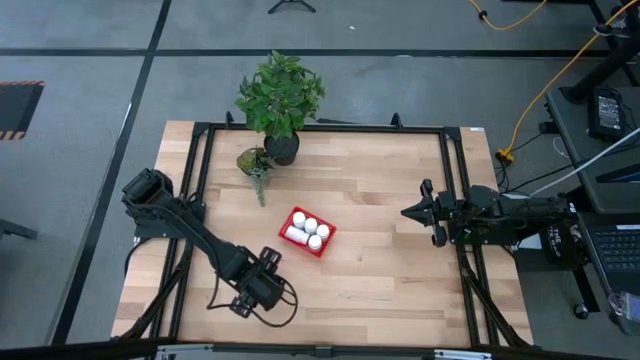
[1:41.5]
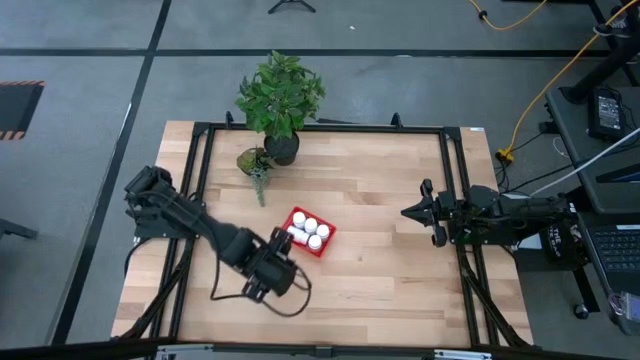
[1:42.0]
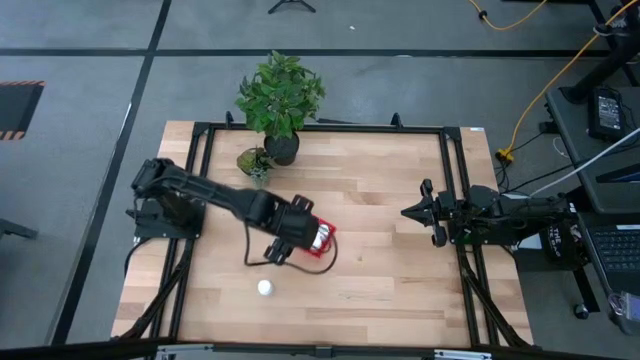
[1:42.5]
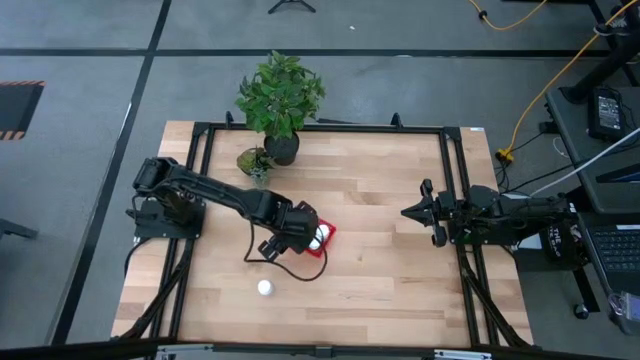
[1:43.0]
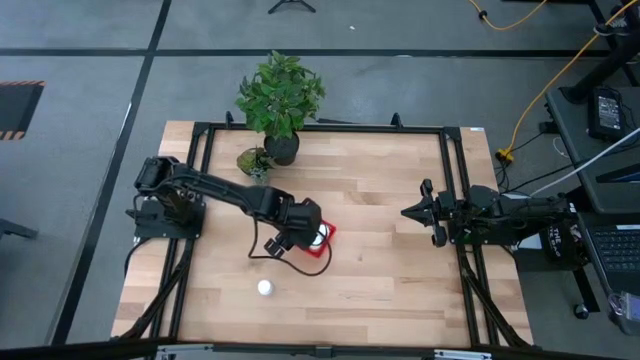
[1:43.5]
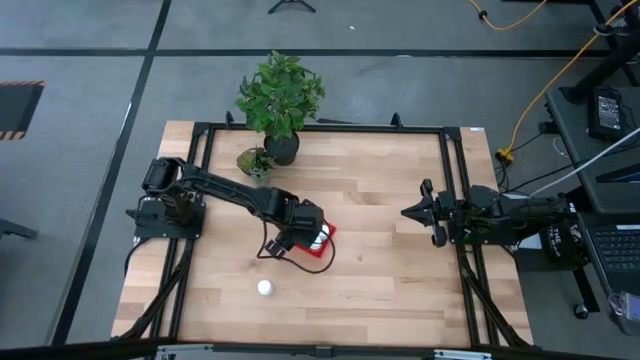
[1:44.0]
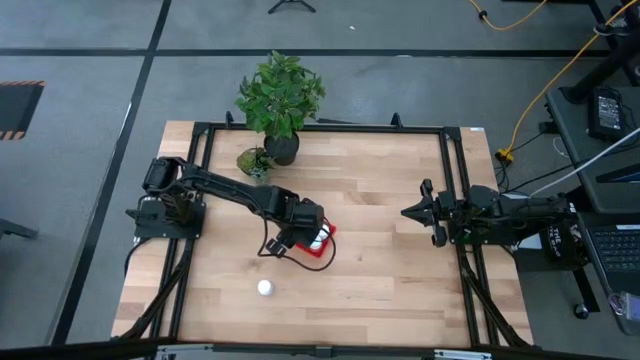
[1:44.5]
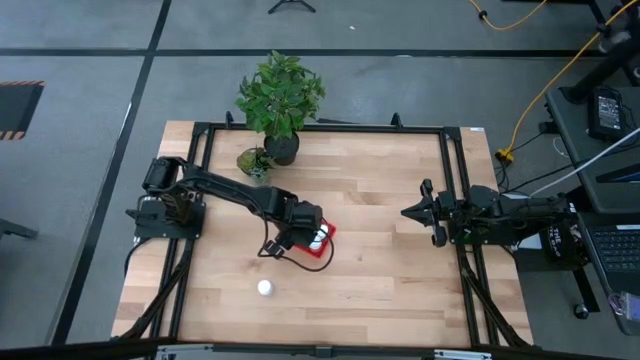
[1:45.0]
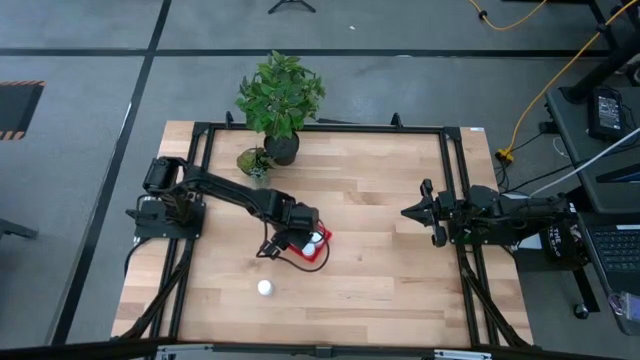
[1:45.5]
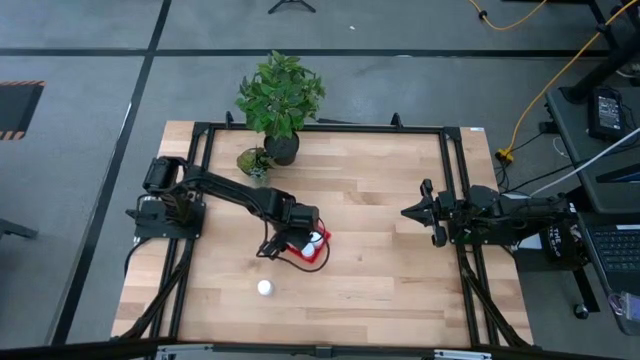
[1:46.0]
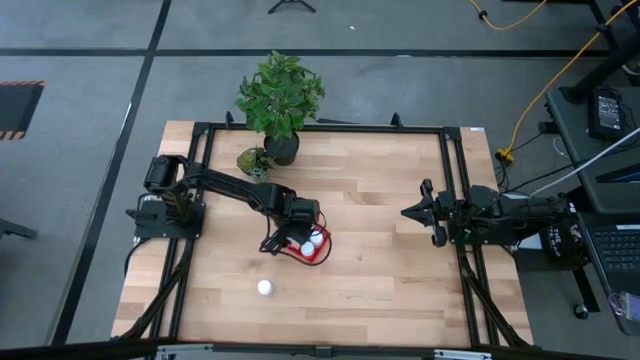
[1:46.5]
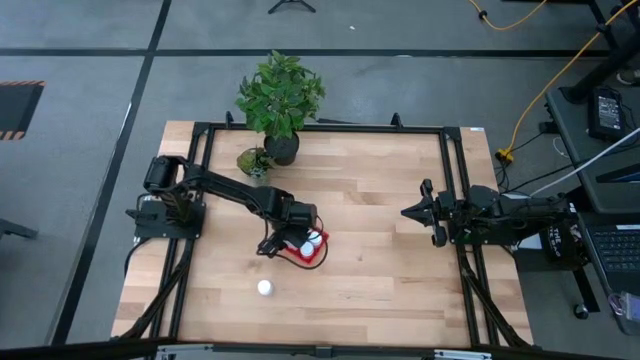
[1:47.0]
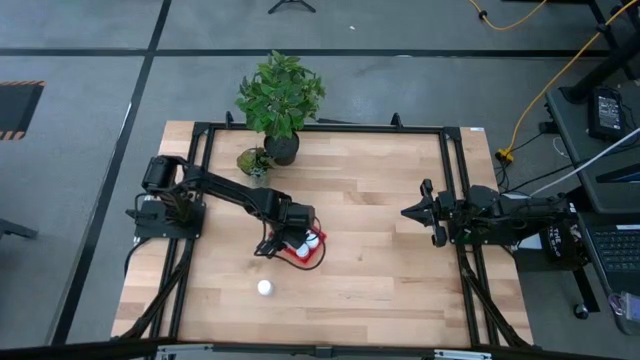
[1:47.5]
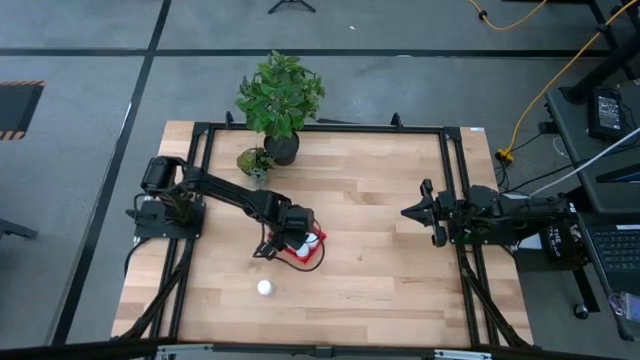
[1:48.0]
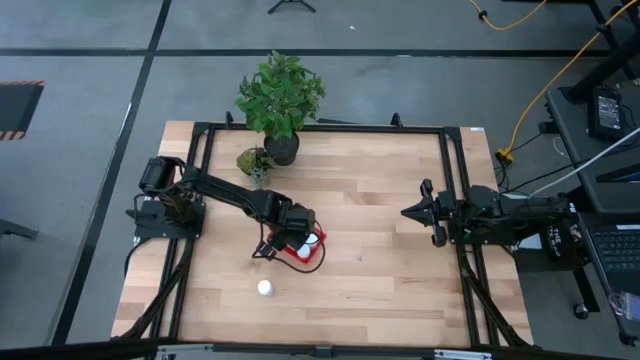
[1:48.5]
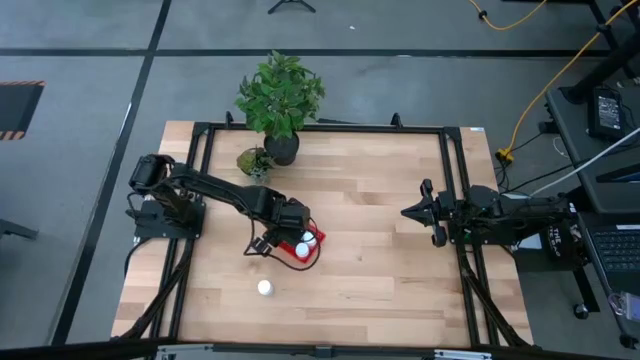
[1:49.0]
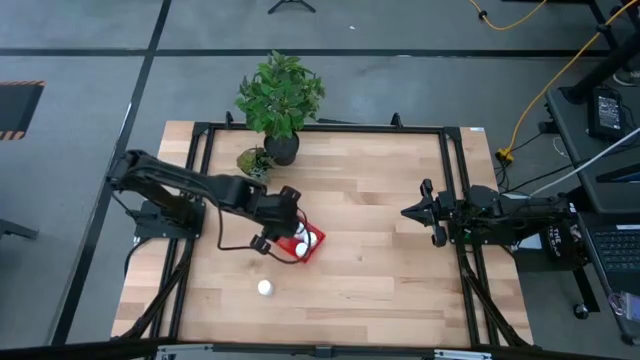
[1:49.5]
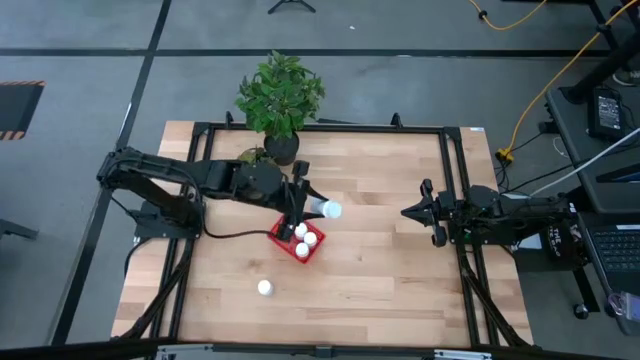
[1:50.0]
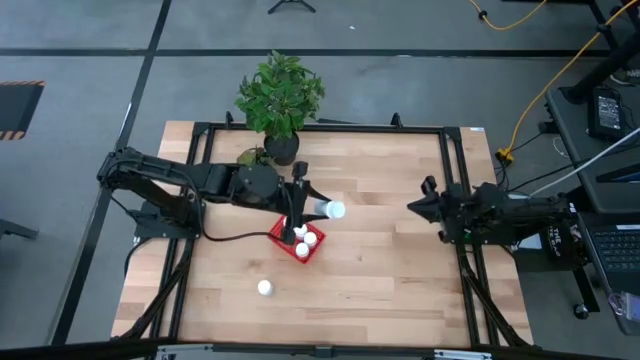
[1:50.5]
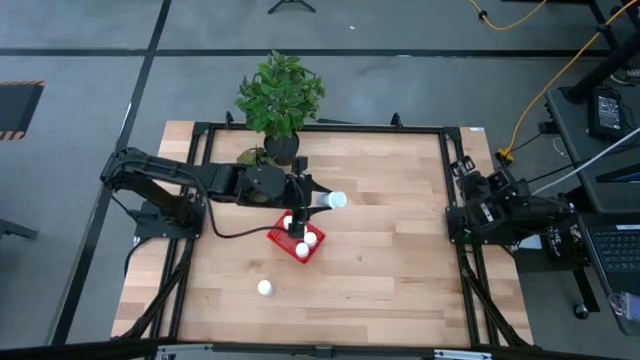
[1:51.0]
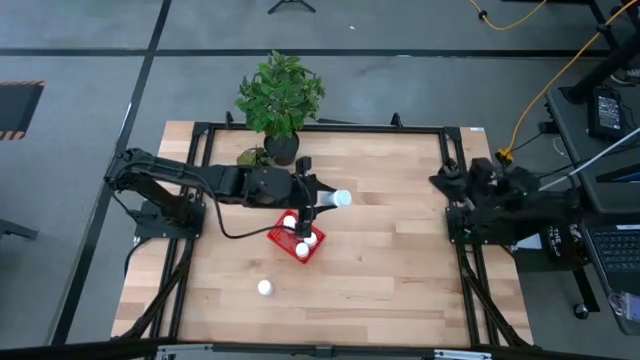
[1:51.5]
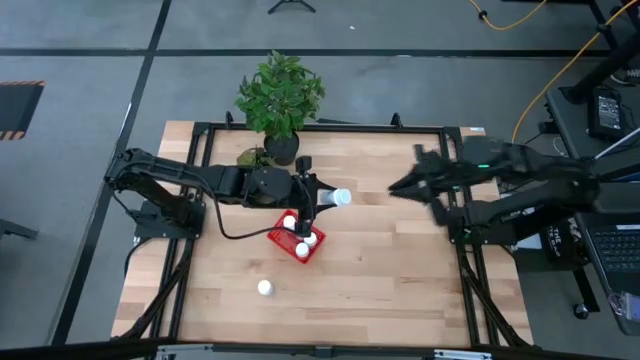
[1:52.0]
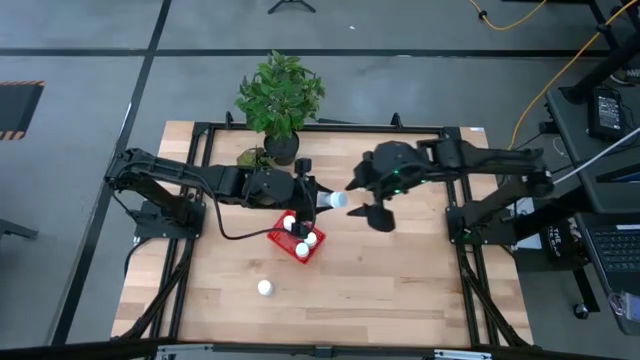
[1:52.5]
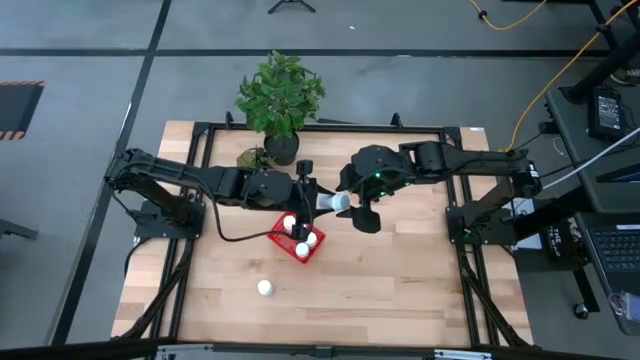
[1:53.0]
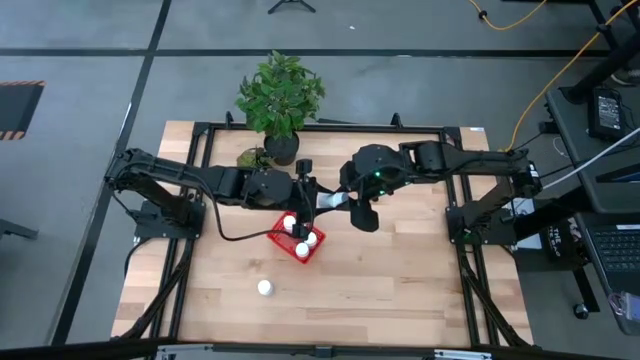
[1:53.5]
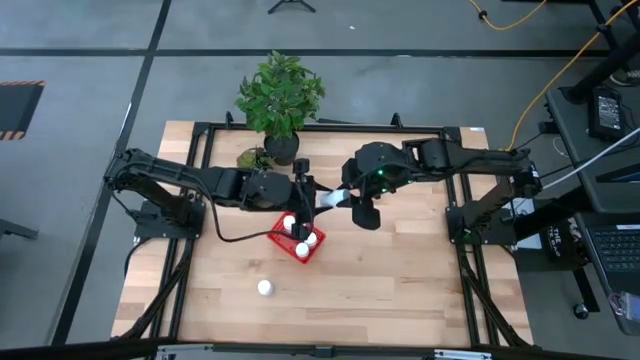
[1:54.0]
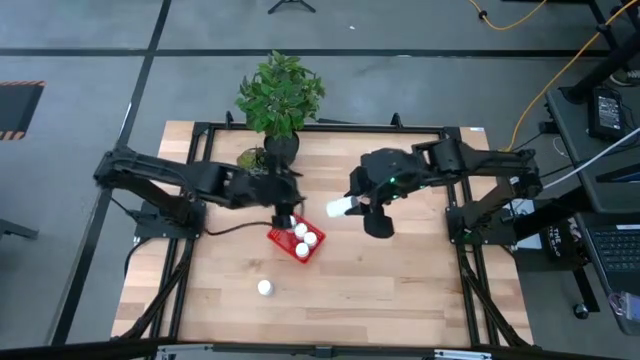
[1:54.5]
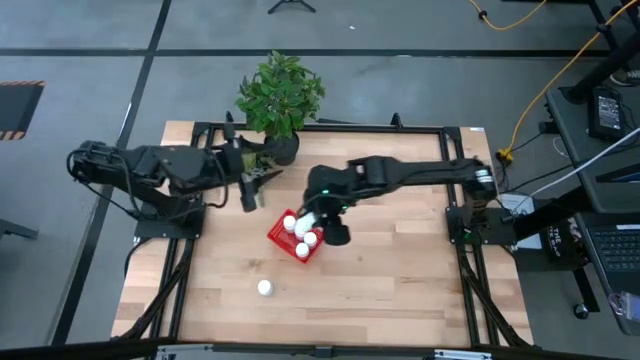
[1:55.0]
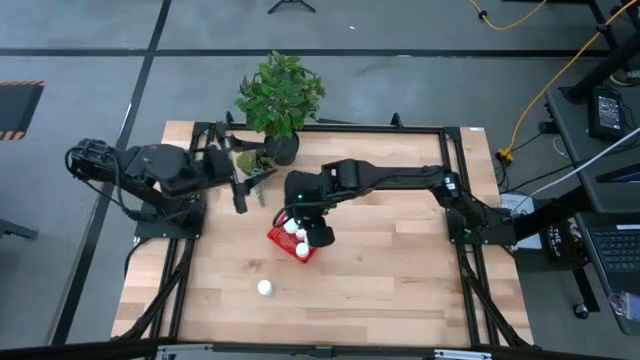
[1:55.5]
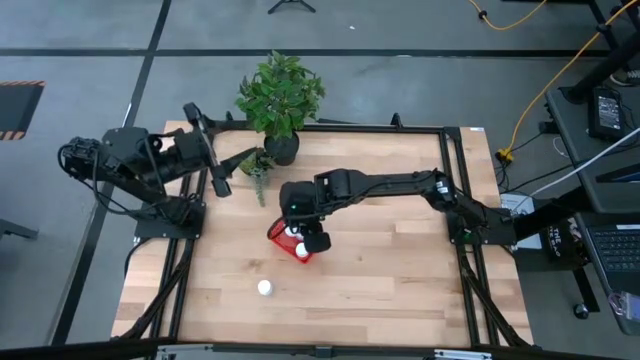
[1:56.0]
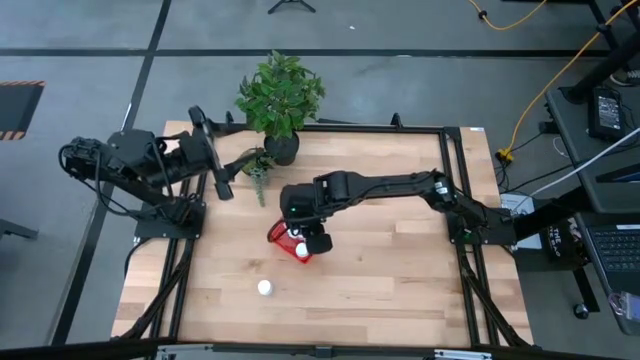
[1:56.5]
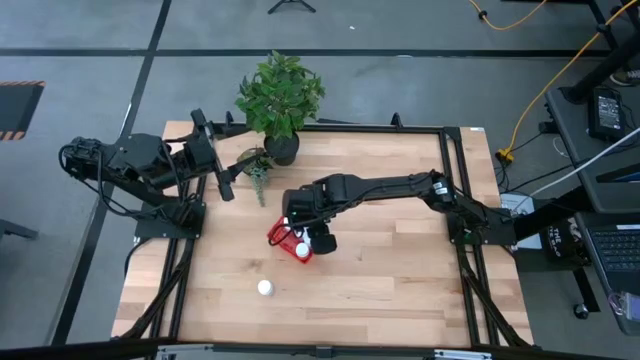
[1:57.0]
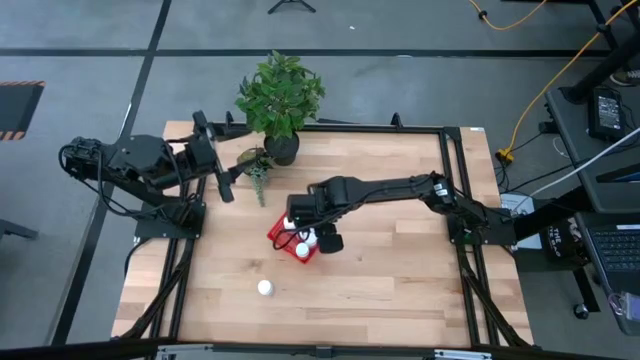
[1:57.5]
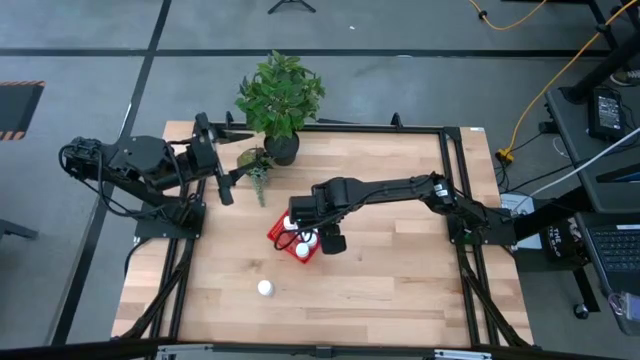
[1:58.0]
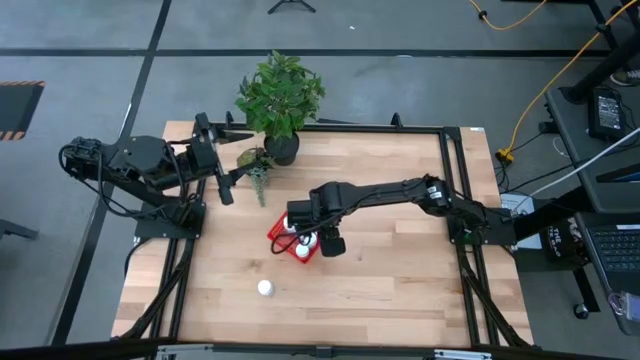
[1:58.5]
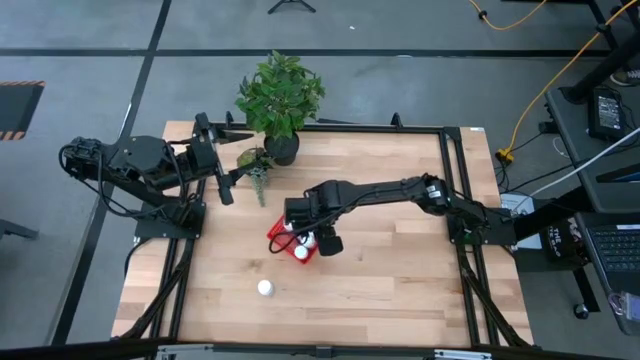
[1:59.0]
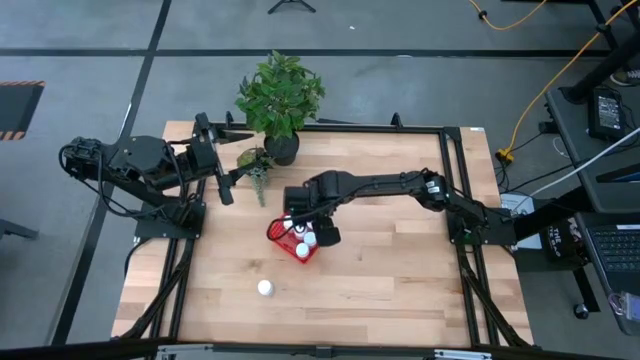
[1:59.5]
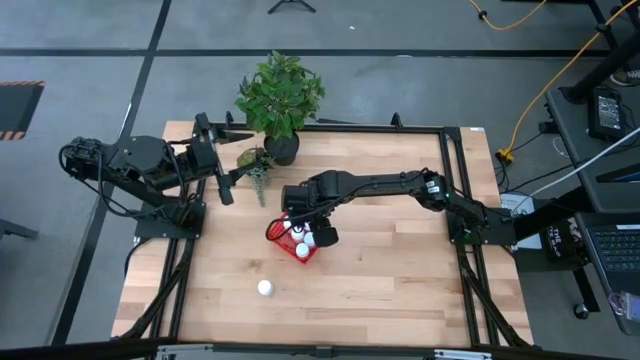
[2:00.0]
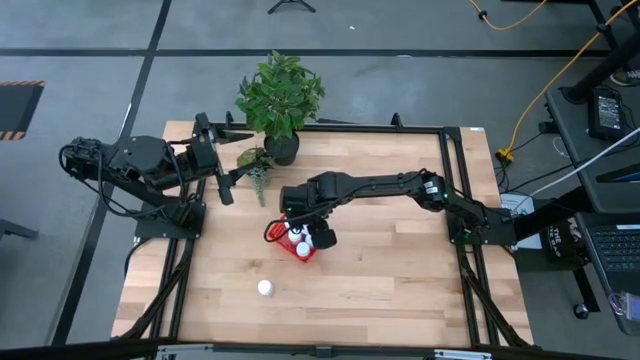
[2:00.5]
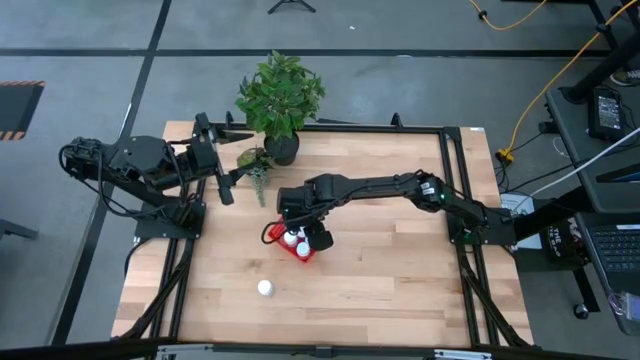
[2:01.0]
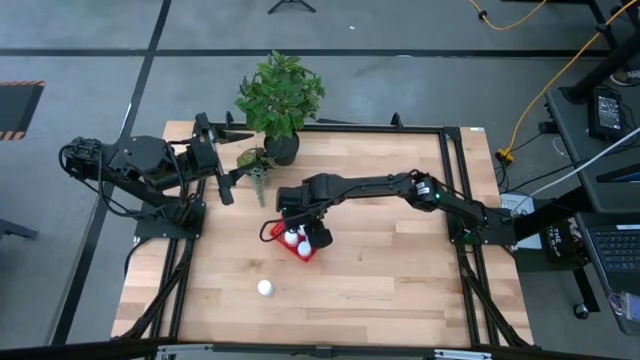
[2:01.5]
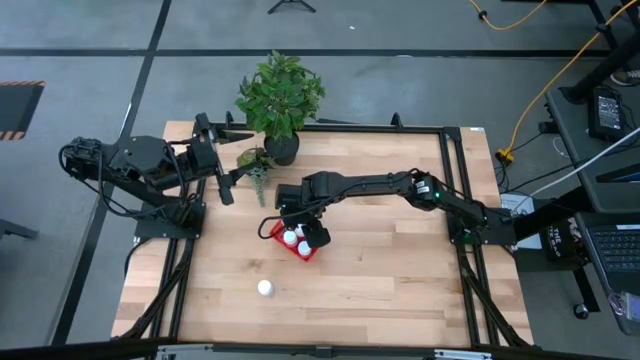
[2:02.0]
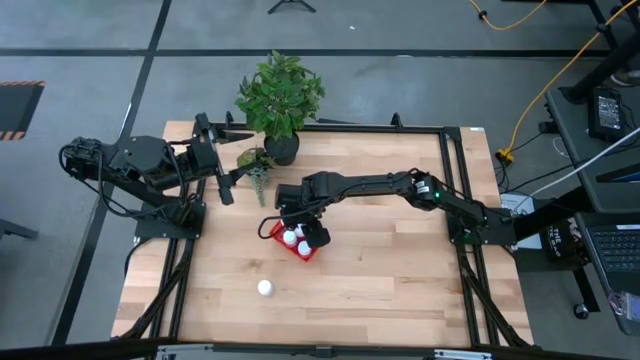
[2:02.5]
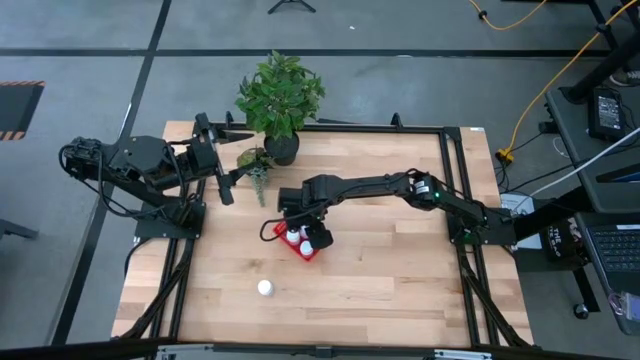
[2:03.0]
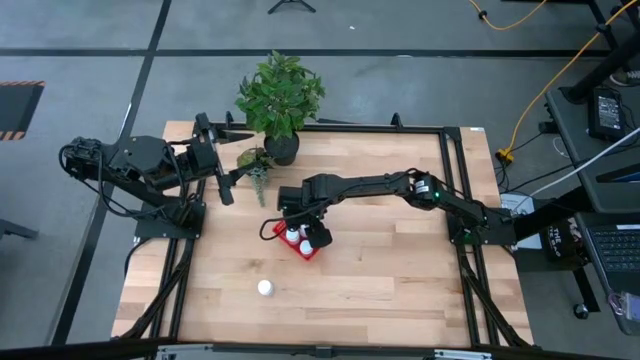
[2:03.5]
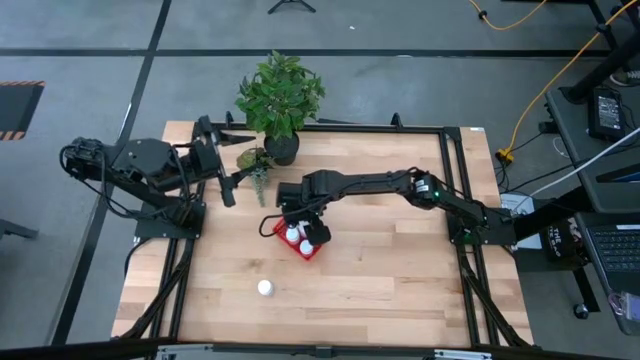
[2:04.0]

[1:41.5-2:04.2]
Task: Pick and place pill bottles into a basket
Adjust the white pill bottle into the bin
